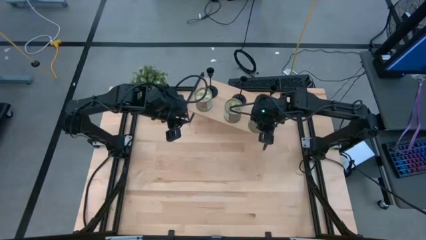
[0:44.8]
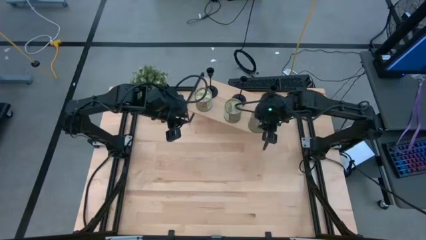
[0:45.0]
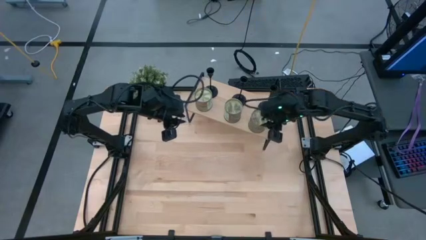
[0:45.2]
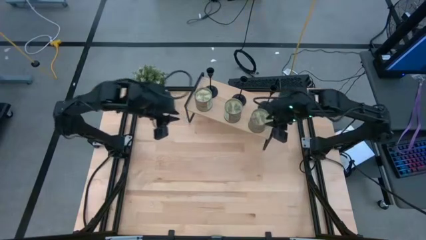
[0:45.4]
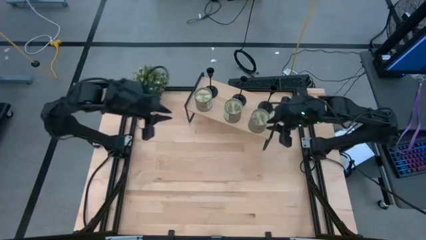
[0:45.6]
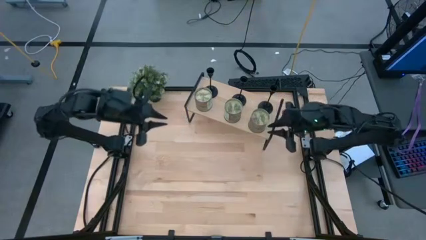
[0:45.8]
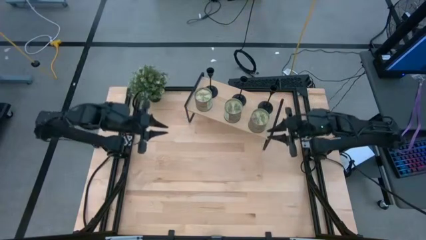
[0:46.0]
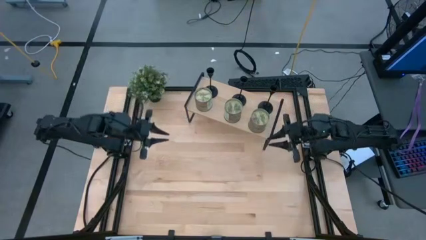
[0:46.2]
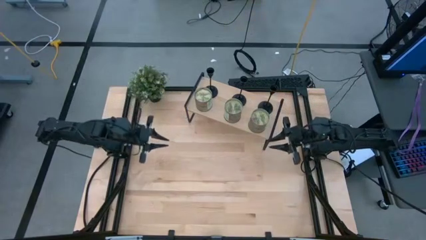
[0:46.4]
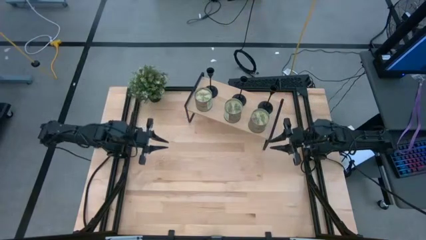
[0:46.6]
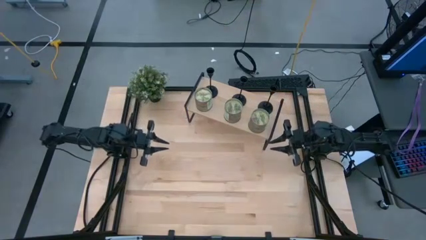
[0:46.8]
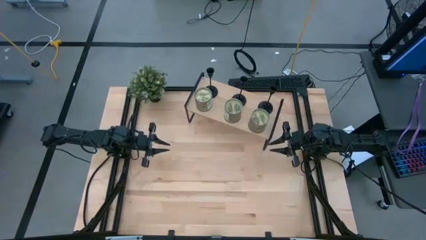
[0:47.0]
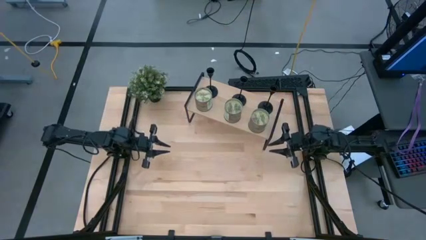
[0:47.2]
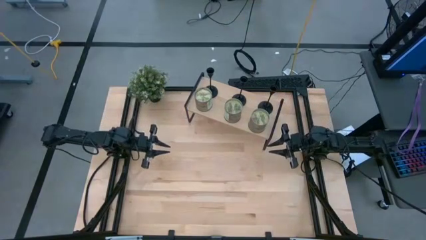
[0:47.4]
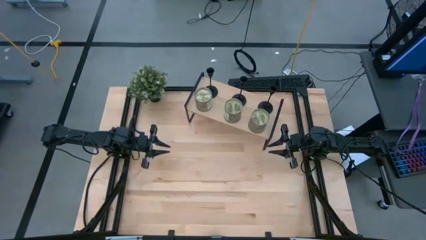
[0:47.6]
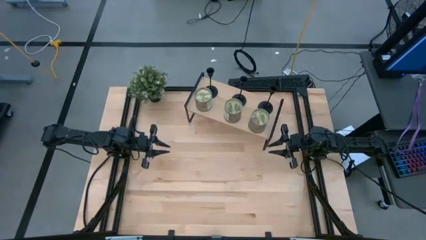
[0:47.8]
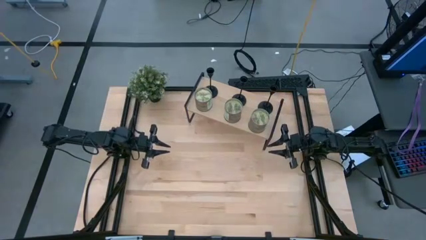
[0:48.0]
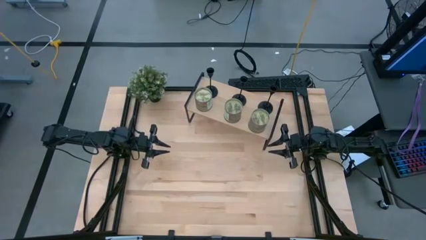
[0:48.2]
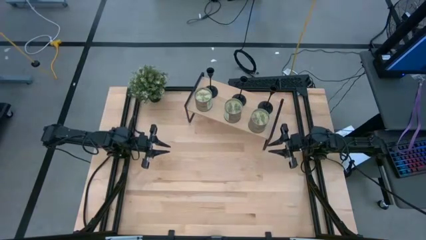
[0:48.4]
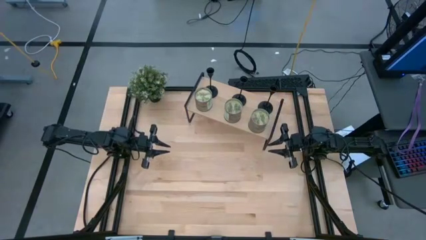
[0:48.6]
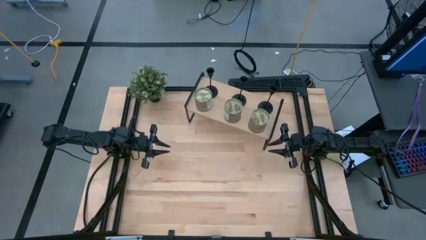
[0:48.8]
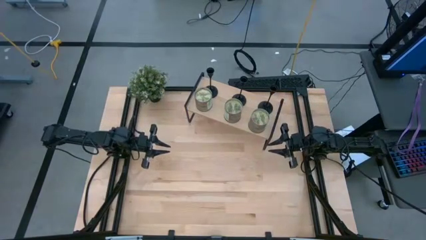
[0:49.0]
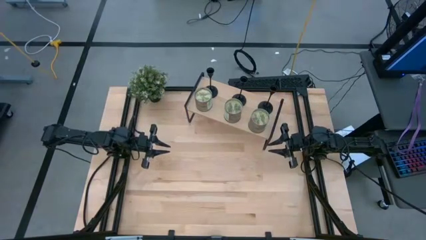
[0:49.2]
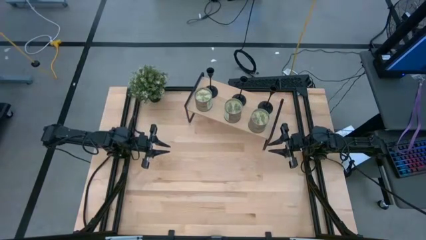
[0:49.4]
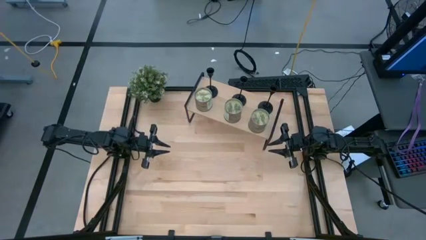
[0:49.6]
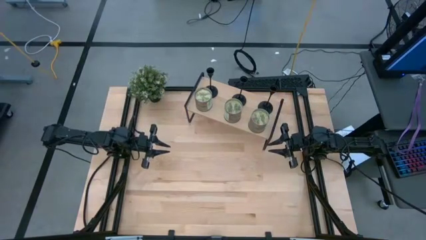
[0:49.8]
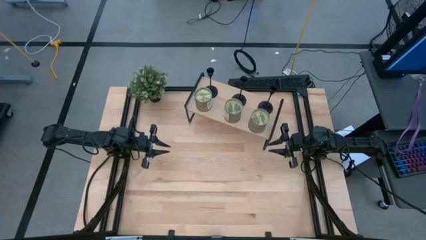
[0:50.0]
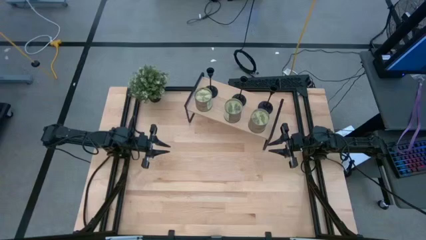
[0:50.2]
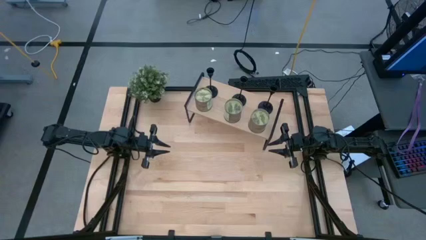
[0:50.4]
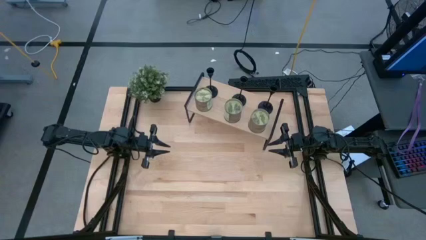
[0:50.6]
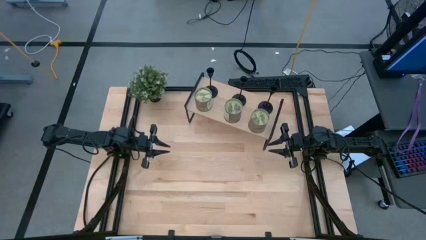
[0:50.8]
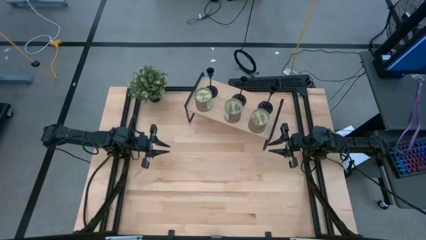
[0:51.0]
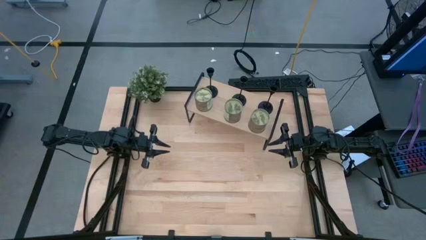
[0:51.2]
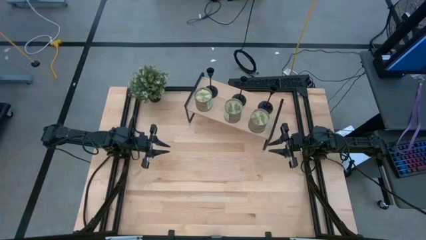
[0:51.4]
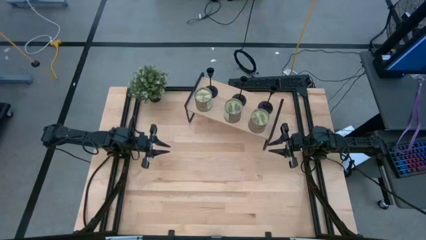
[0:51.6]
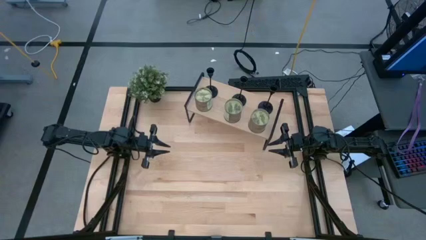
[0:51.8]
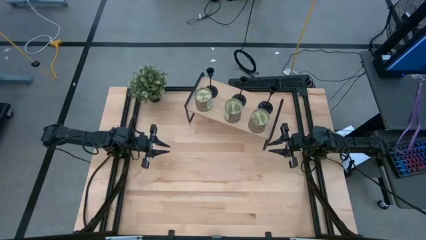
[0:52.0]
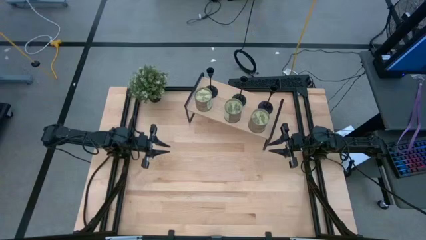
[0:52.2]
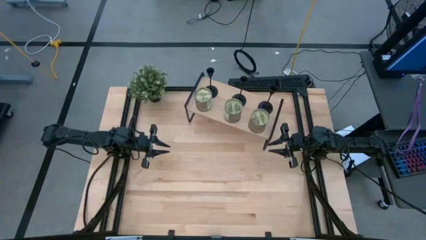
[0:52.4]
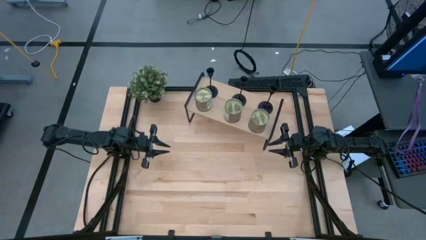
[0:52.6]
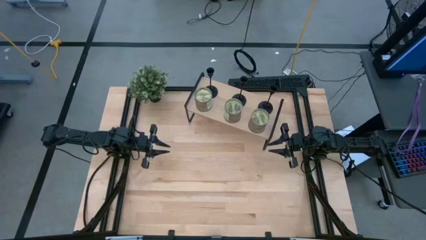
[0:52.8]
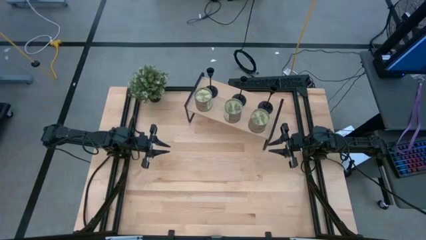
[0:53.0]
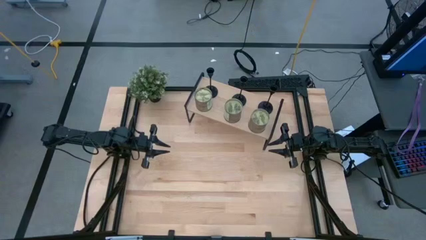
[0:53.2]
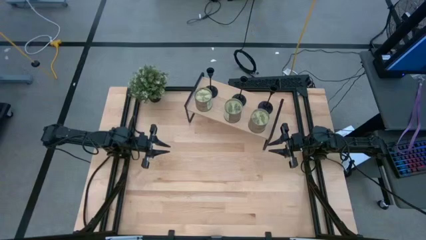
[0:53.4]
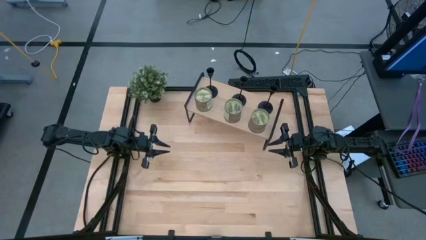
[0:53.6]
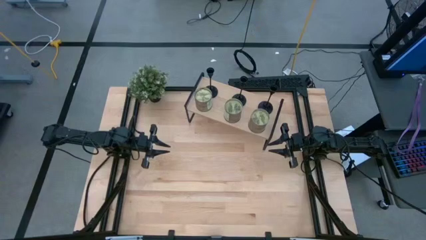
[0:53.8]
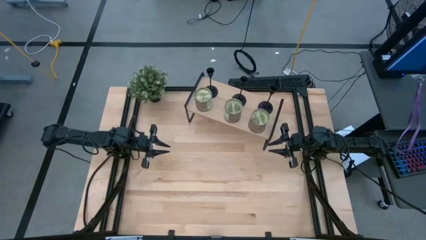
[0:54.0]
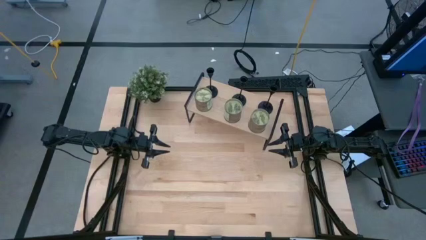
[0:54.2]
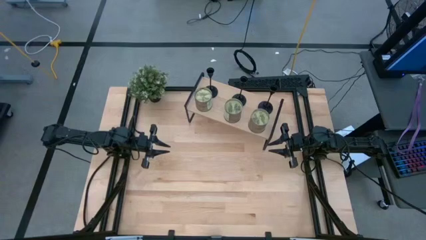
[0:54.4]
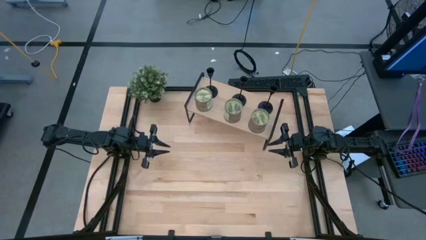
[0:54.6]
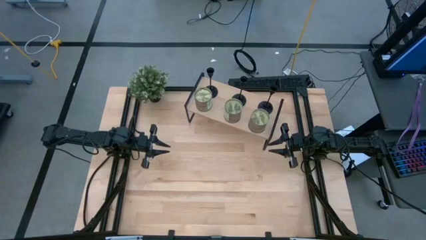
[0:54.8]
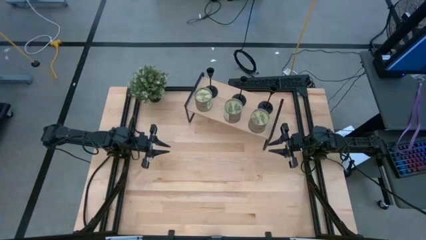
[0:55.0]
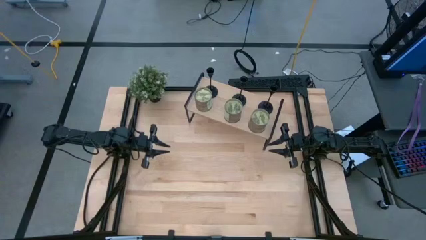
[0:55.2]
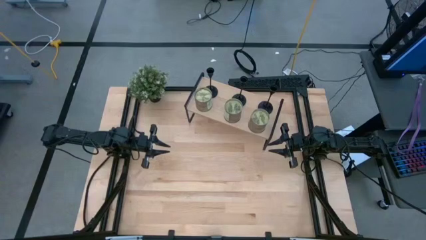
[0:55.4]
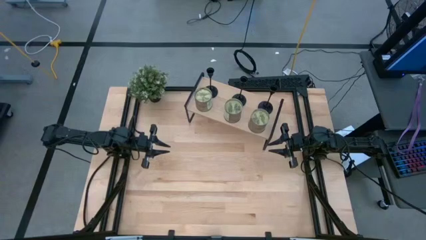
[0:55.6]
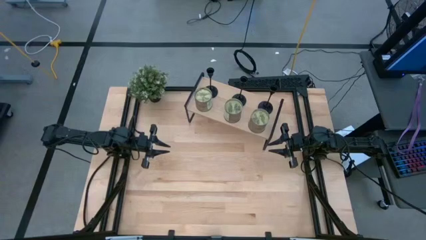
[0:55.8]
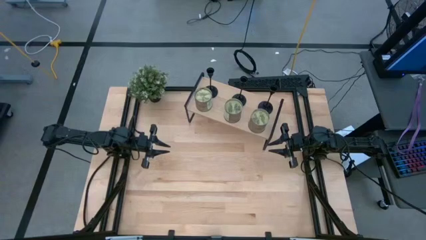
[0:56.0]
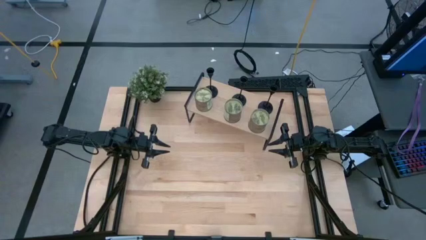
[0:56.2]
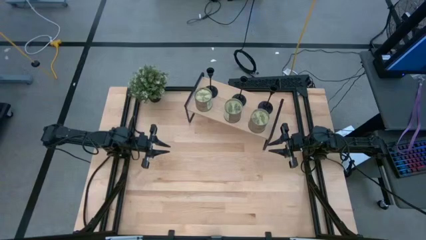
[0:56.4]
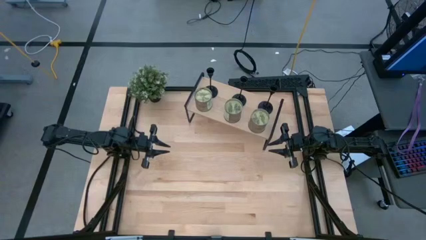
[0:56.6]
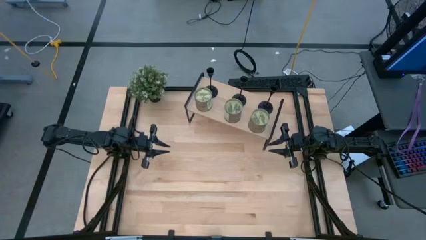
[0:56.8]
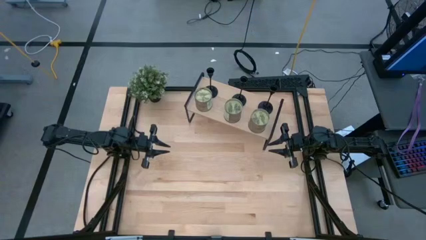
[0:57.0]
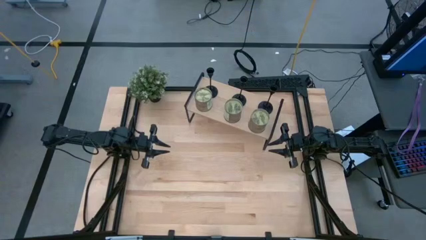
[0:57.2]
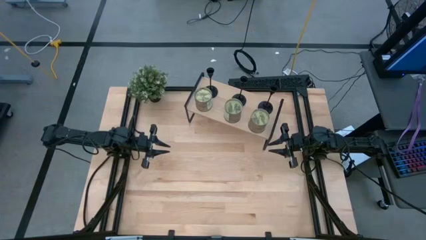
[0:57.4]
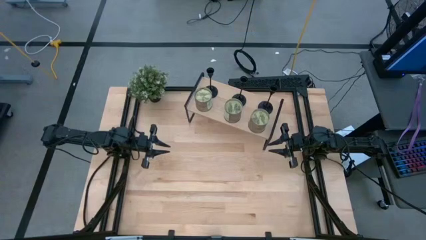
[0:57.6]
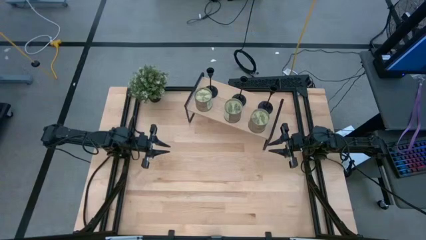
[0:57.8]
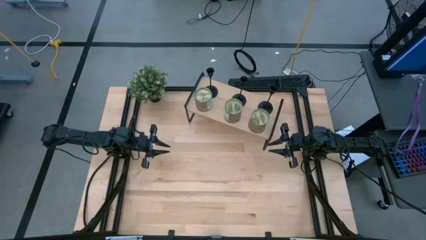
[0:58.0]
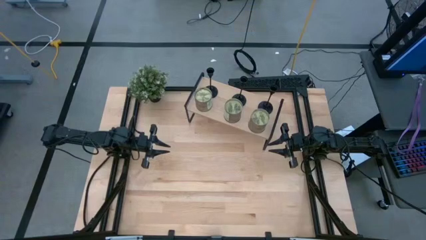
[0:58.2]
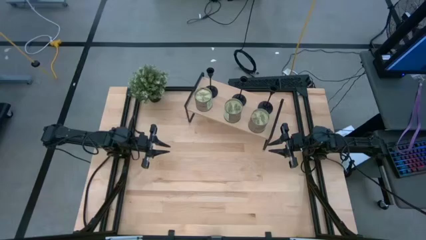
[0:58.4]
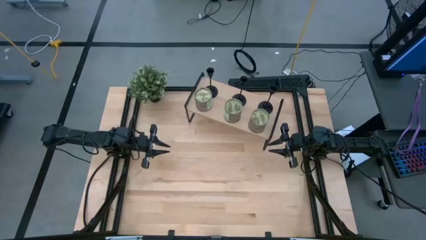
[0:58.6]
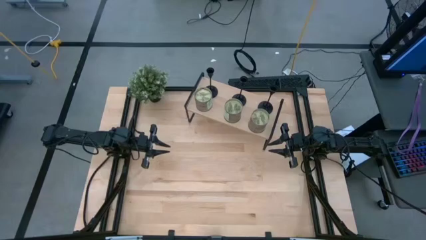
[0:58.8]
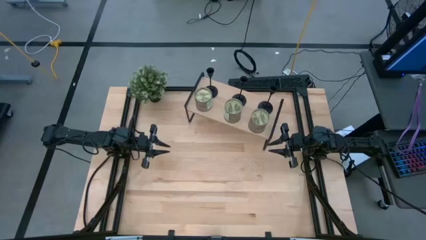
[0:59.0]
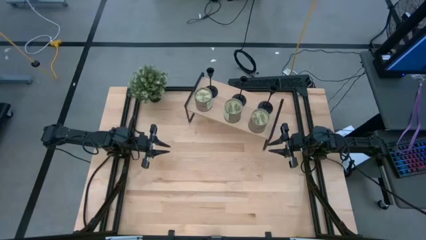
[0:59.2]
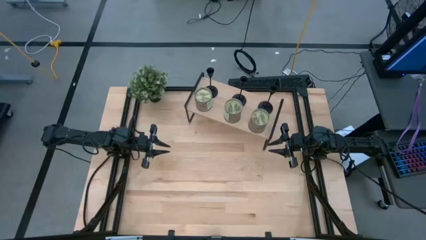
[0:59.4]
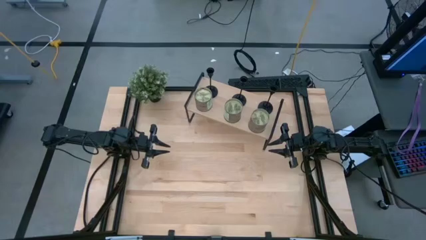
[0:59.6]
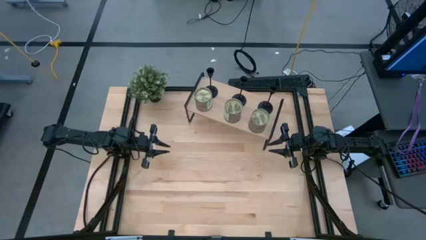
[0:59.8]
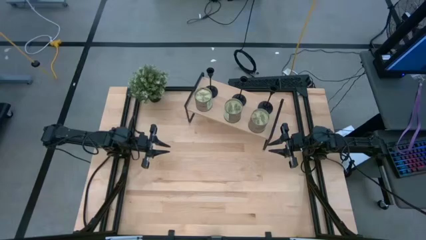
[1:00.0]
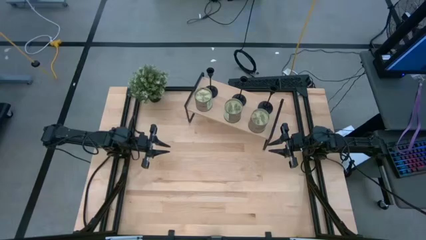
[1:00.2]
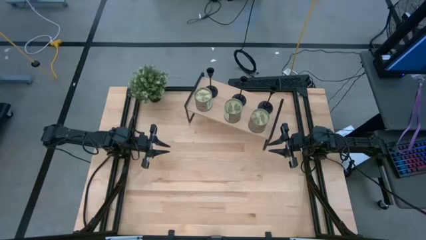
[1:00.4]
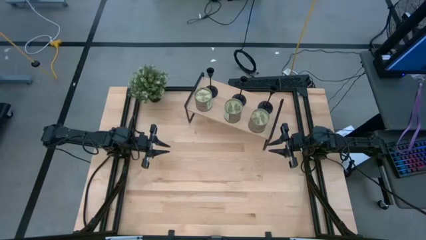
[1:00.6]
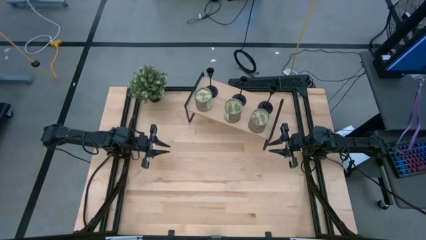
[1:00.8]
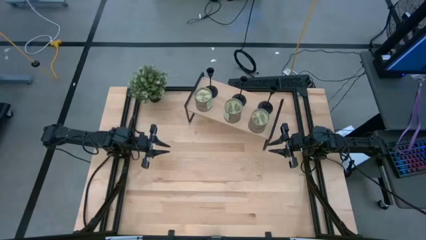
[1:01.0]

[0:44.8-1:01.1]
Task: Pick & Place candle stick holders
Return to Home Position
